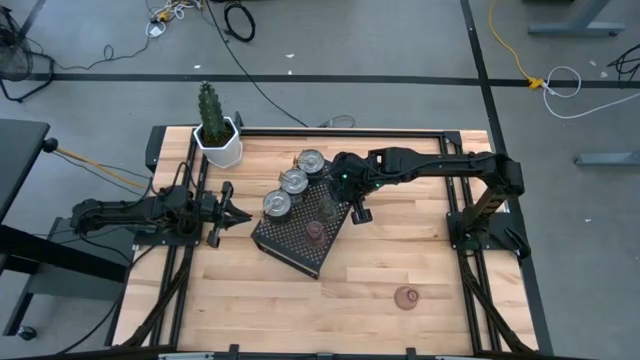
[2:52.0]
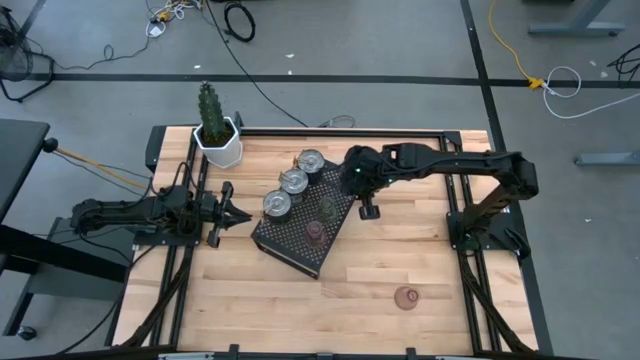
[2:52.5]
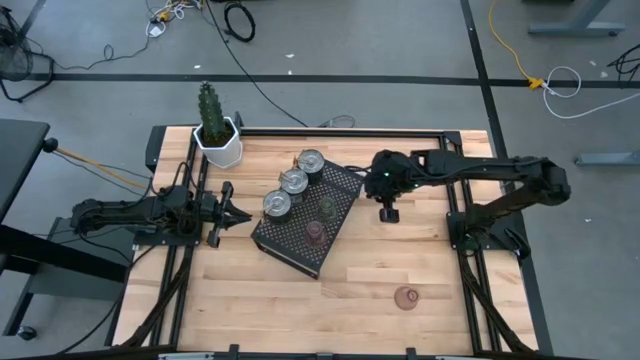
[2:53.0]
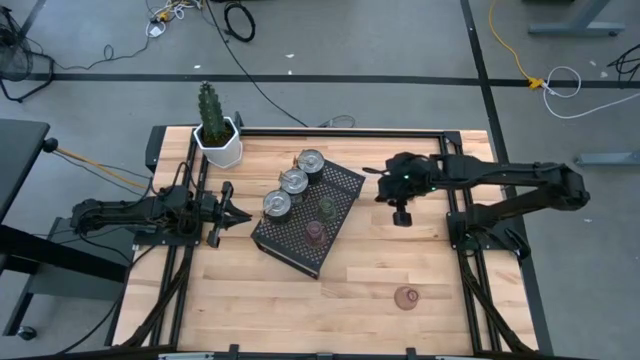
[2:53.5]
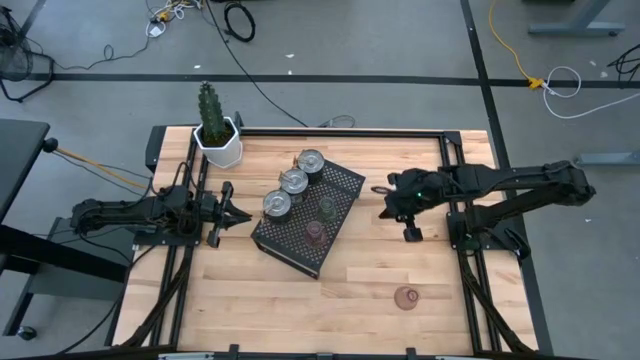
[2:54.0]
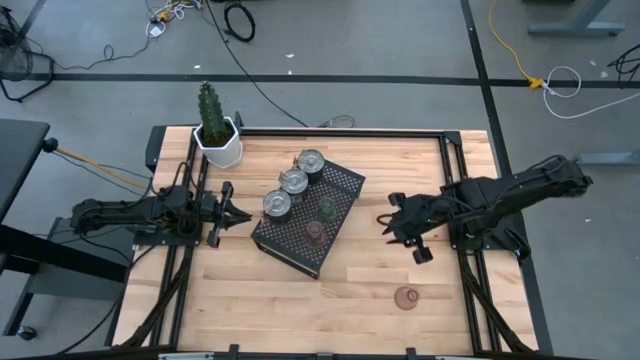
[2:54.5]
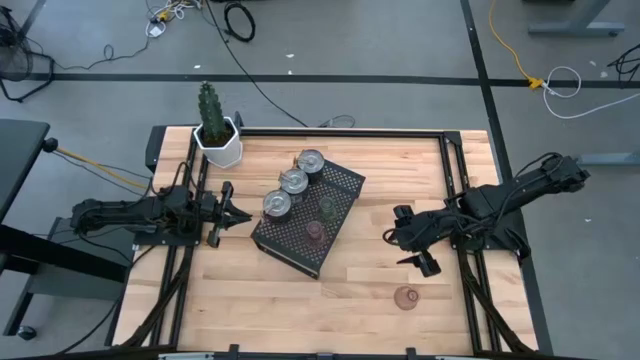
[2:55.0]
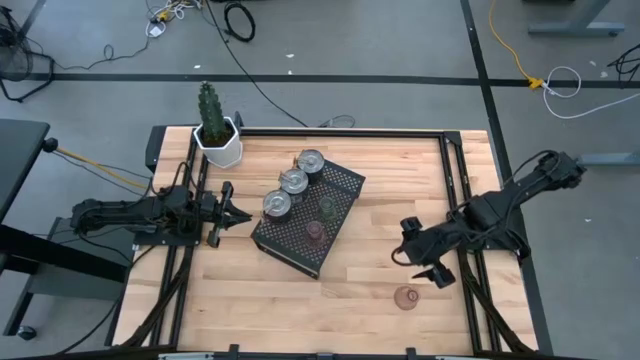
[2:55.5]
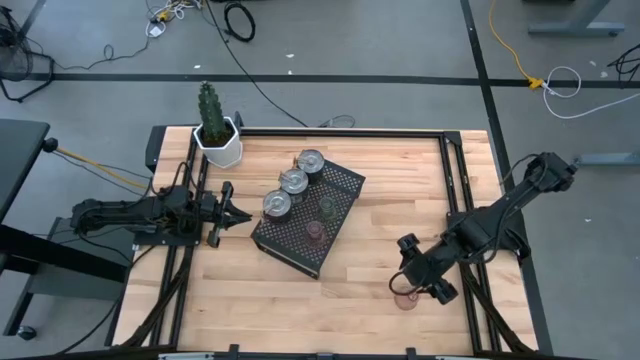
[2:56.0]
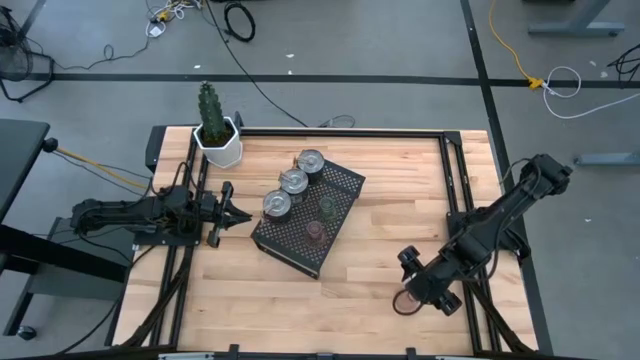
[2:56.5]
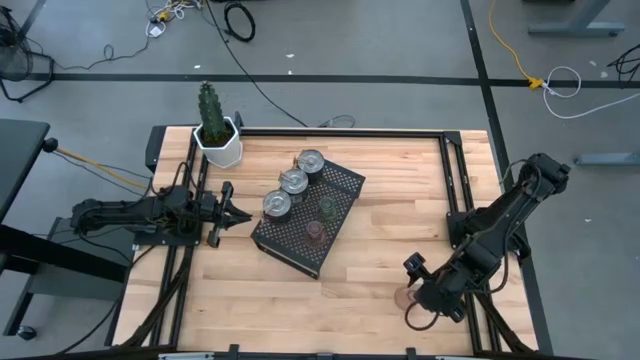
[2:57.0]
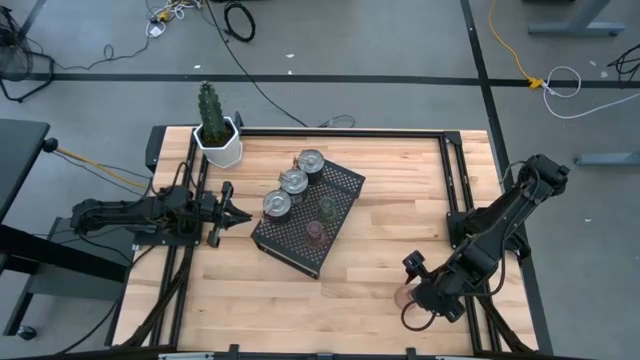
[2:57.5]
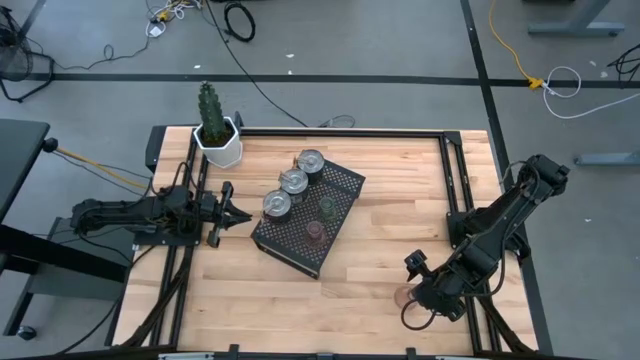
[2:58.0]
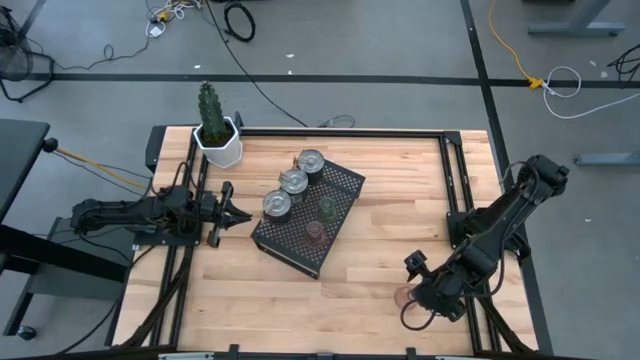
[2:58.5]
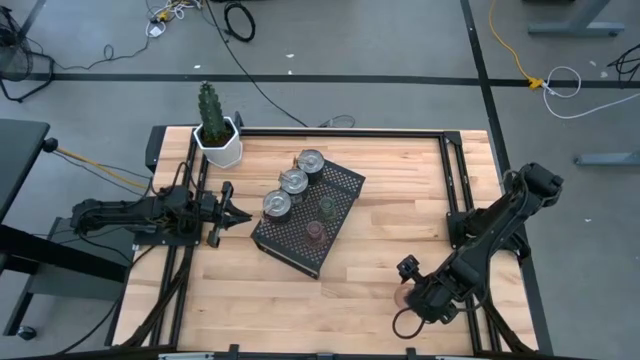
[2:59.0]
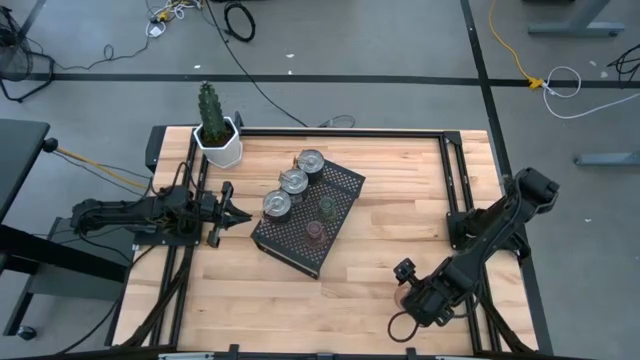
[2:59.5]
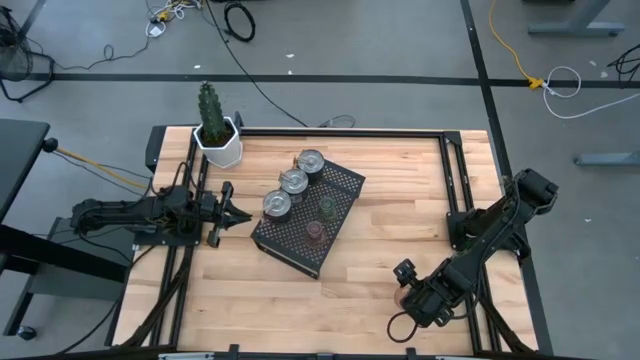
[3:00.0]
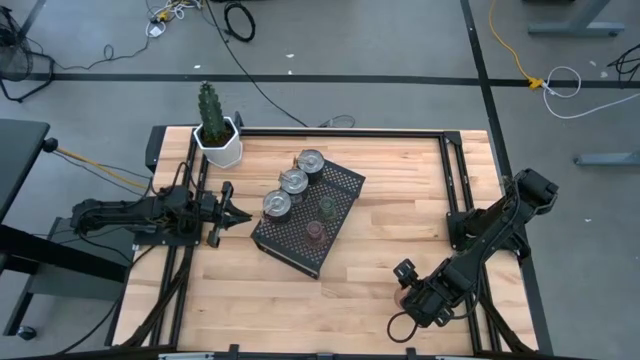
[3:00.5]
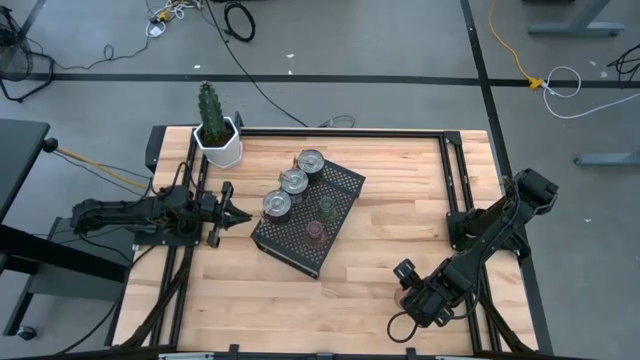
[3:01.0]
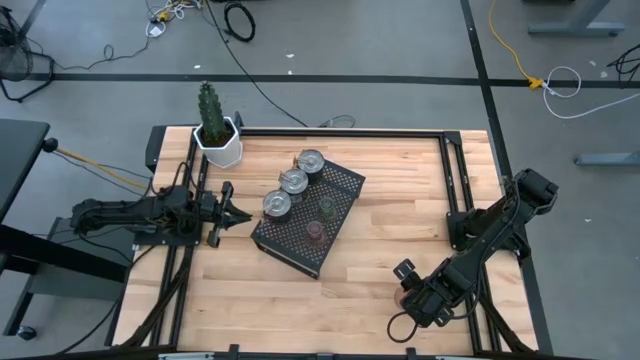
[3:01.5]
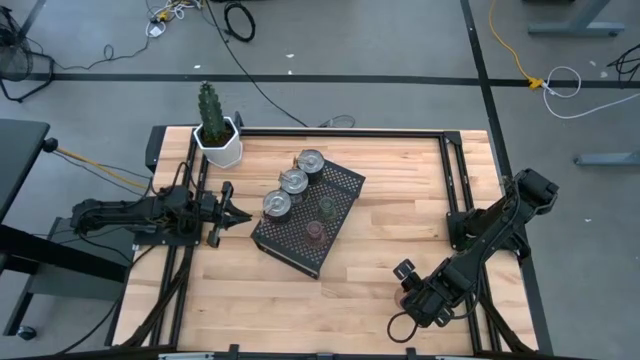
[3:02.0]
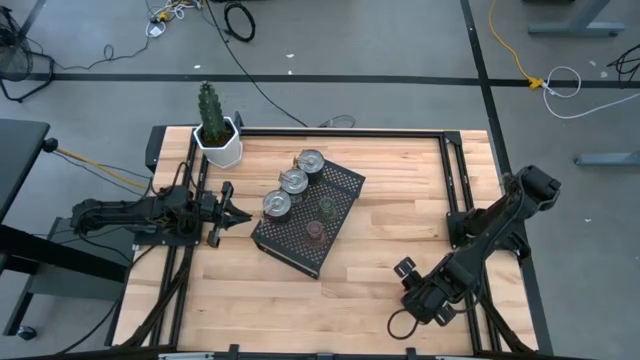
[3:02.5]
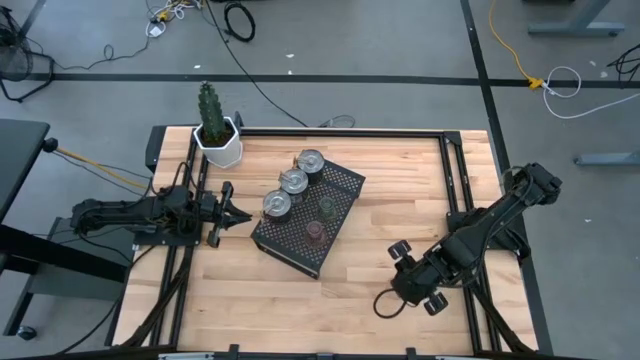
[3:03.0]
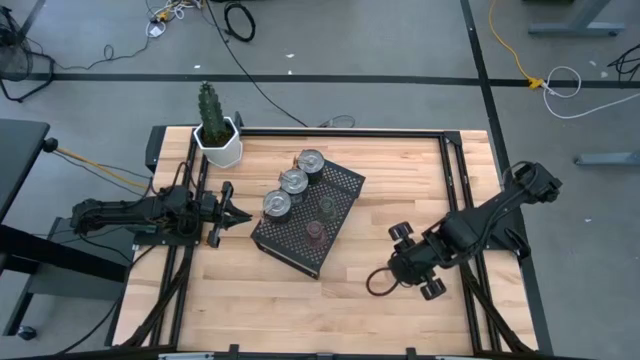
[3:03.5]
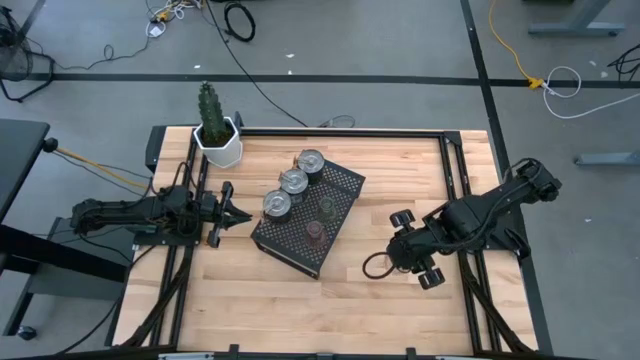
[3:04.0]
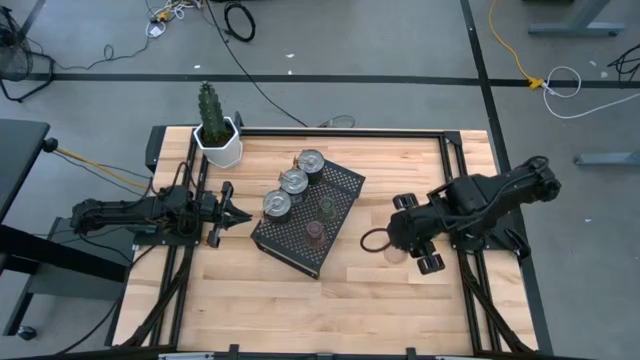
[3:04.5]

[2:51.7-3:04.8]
Task: Pick & Place candle stick holders
Put the purple candle holder on the shelf

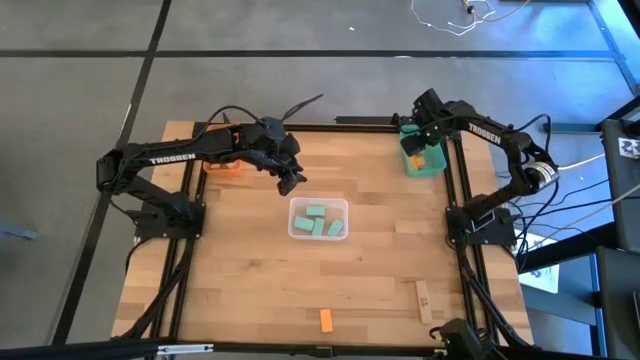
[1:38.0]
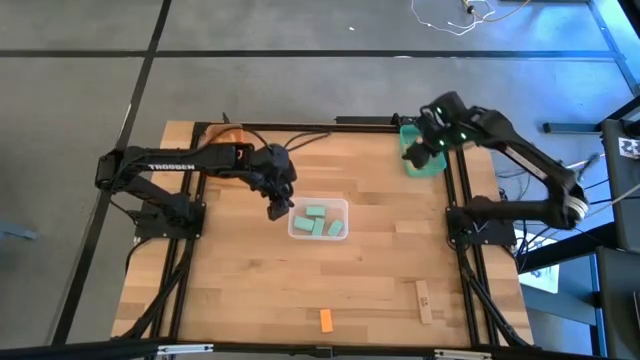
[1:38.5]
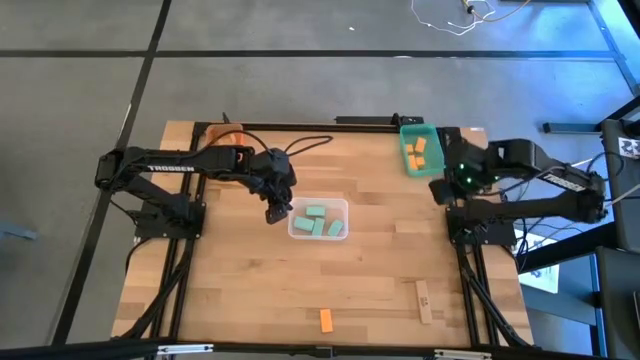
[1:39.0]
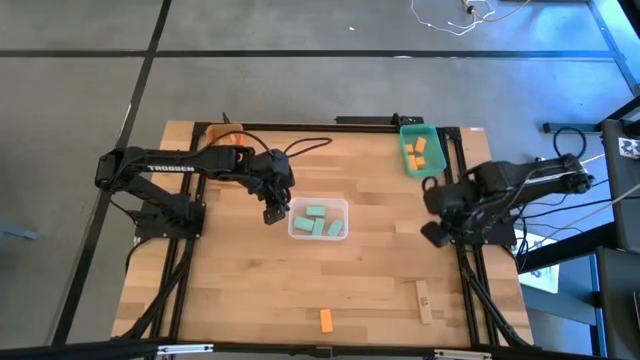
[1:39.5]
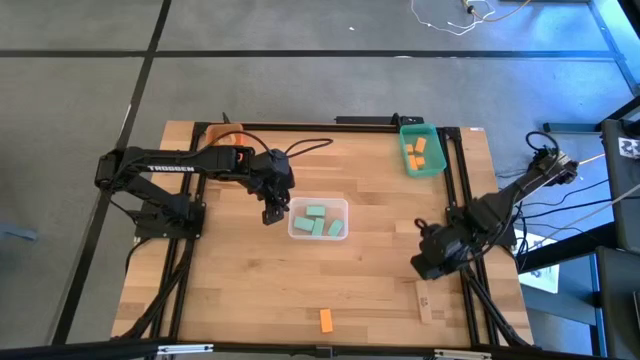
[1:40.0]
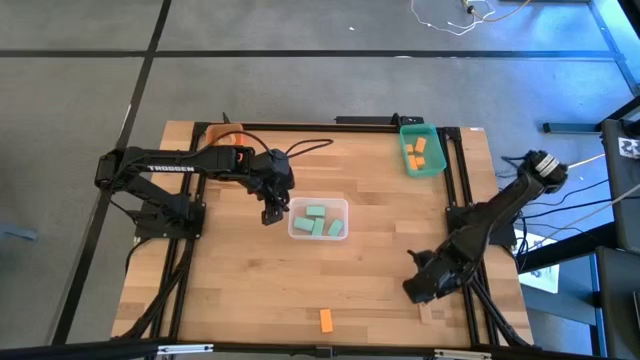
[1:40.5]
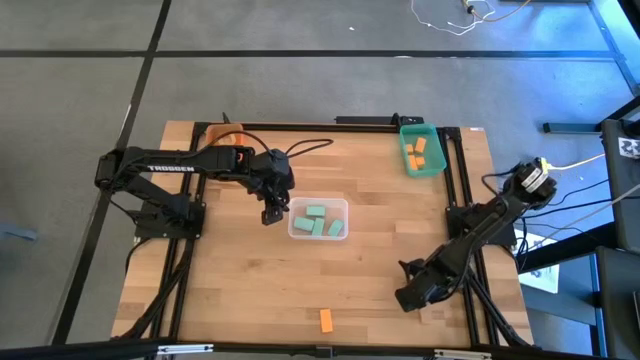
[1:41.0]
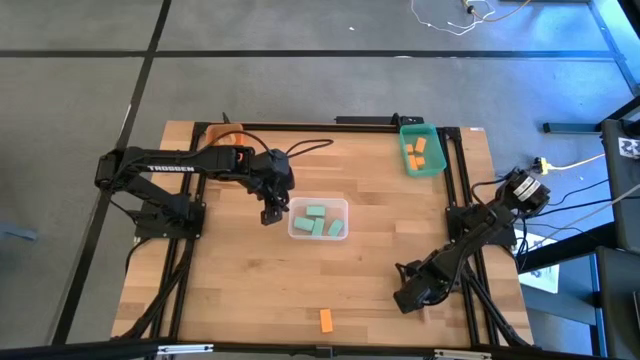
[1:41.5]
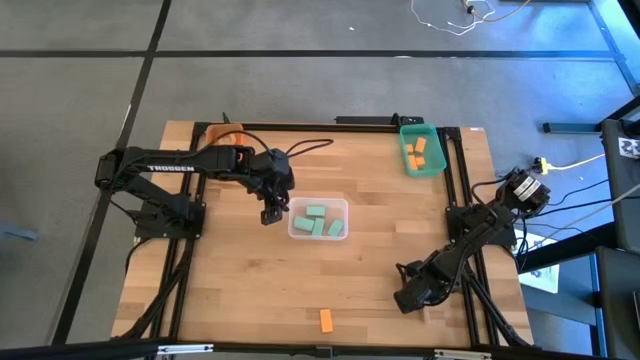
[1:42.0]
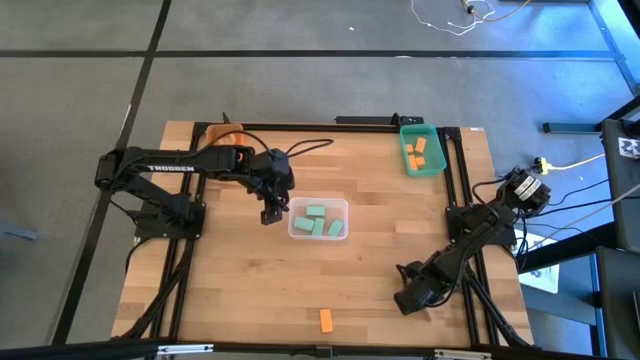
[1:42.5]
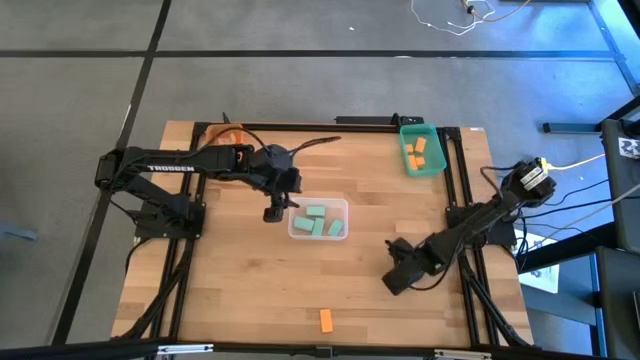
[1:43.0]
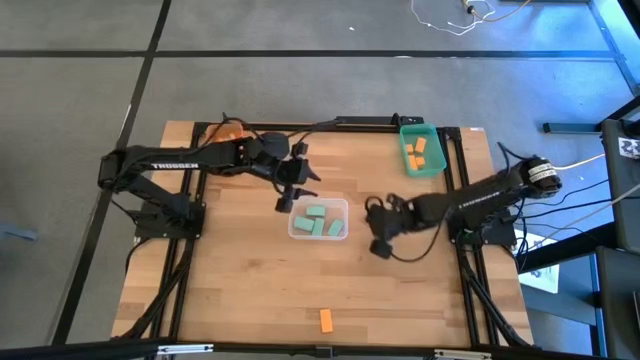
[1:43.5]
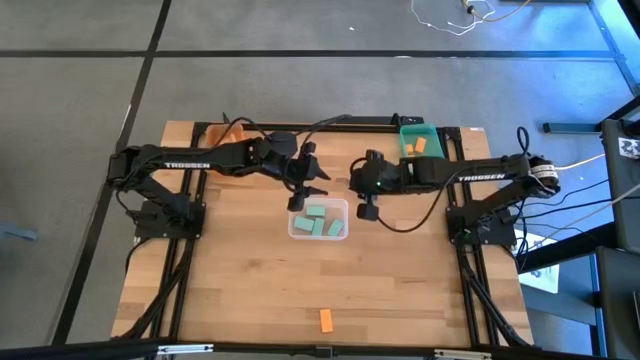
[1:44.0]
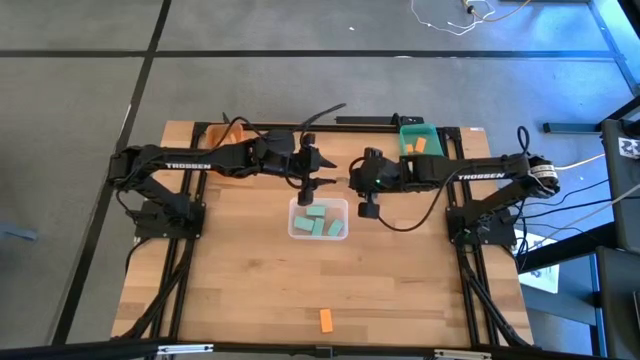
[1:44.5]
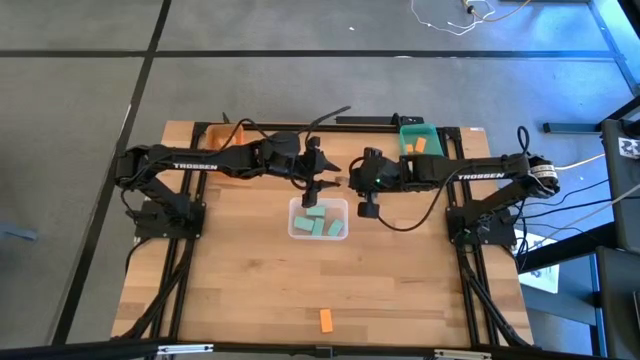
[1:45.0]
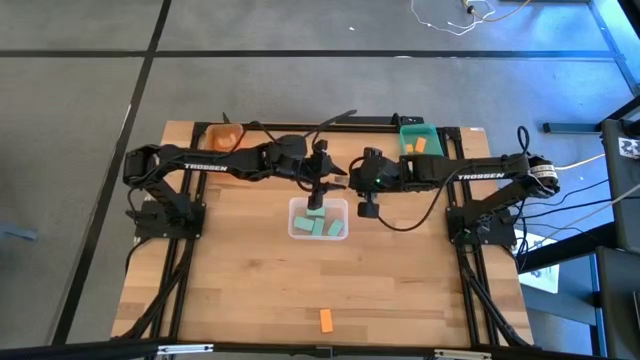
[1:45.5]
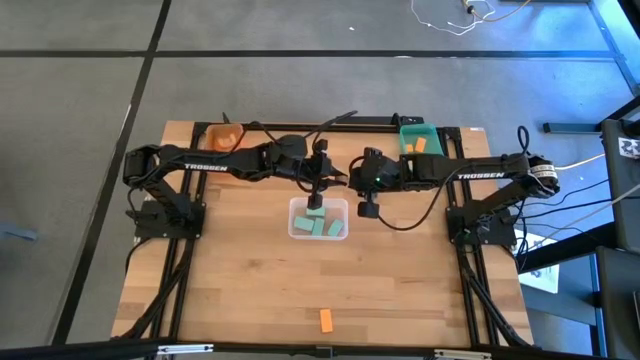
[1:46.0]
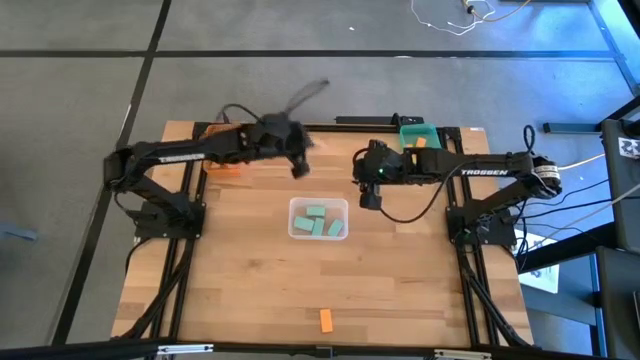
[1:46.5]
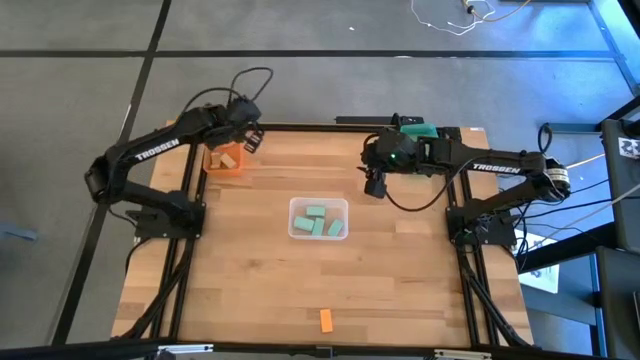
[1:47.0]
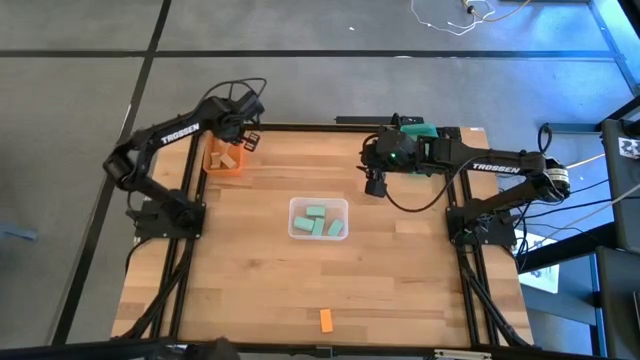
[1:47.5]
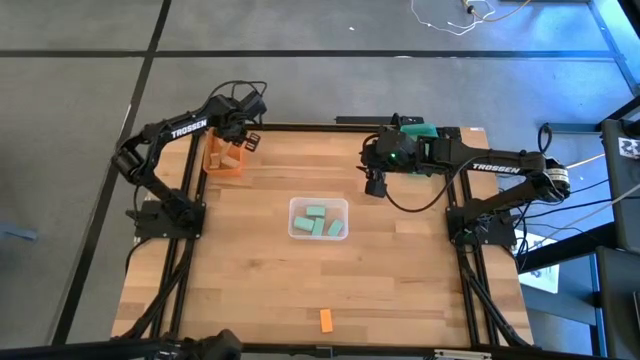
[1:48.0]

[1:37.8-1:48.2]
Task: Sort & place blocks by color
Put the light brown block into the orange bin
